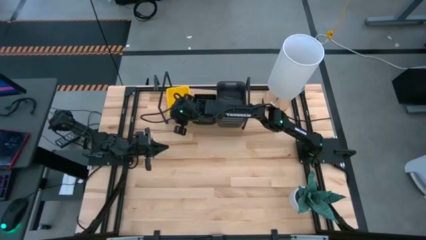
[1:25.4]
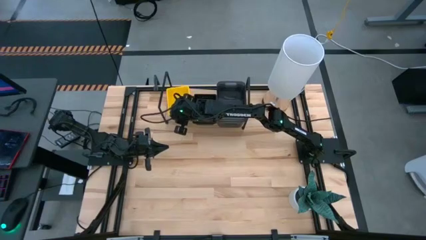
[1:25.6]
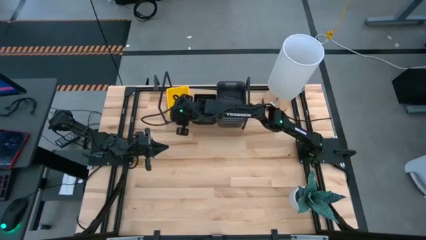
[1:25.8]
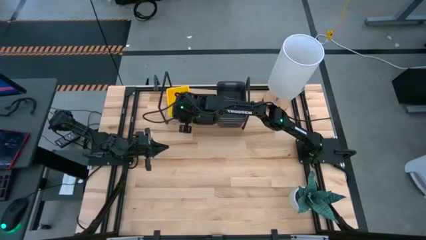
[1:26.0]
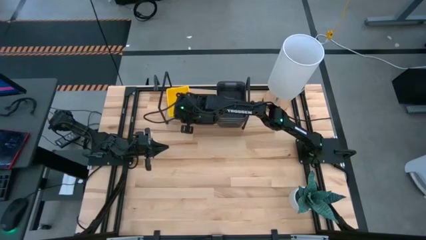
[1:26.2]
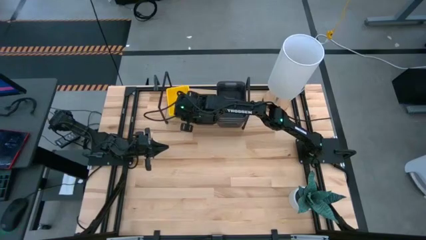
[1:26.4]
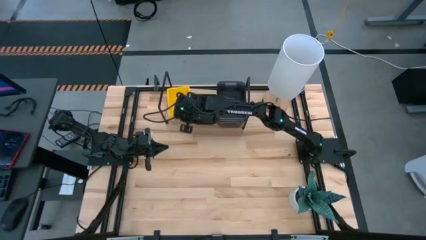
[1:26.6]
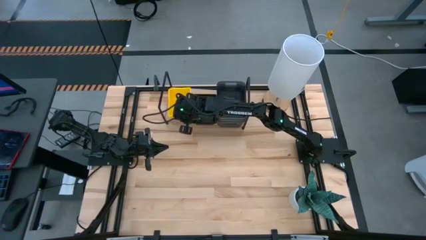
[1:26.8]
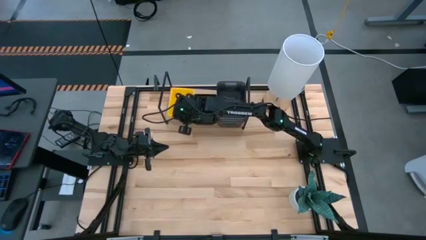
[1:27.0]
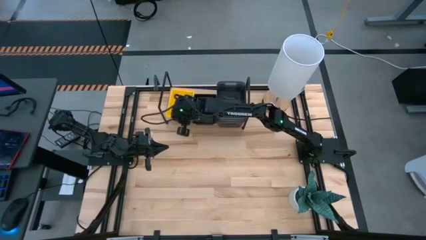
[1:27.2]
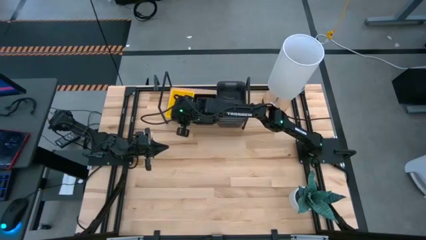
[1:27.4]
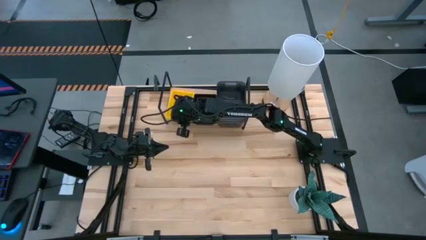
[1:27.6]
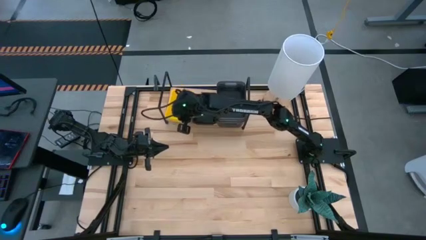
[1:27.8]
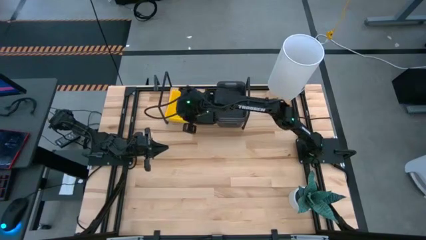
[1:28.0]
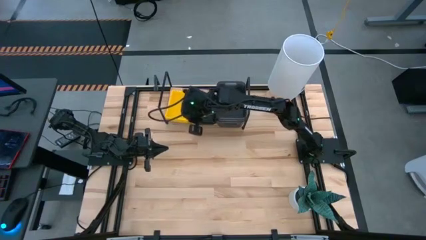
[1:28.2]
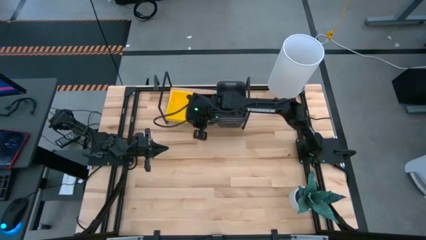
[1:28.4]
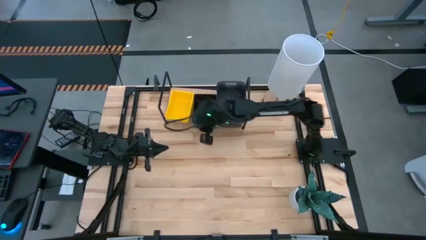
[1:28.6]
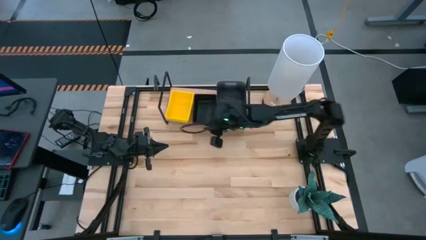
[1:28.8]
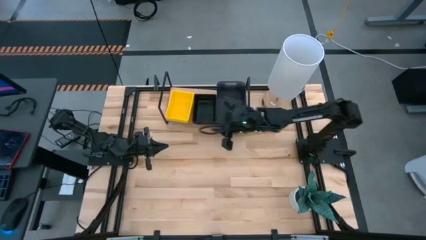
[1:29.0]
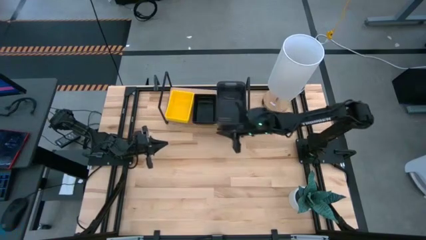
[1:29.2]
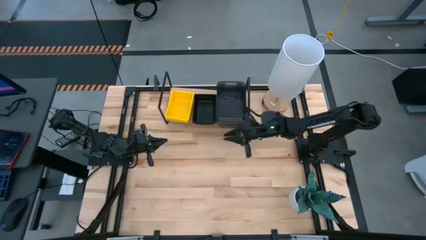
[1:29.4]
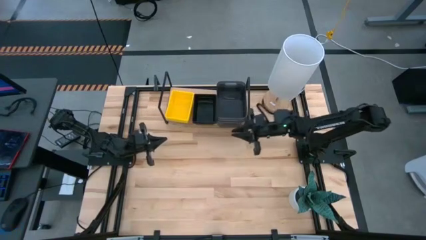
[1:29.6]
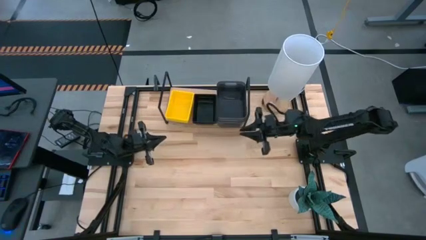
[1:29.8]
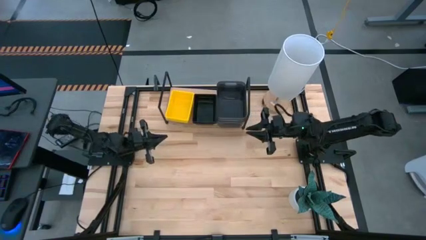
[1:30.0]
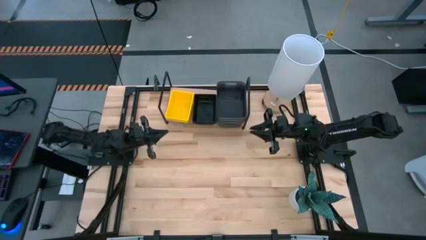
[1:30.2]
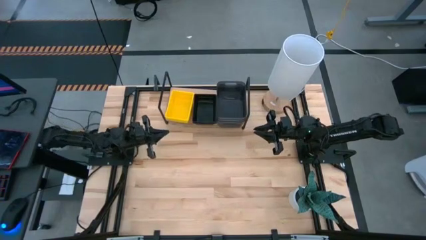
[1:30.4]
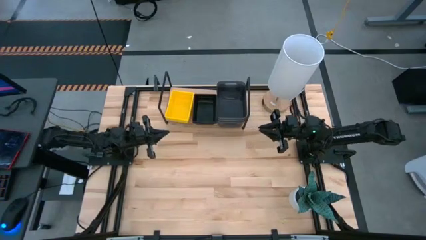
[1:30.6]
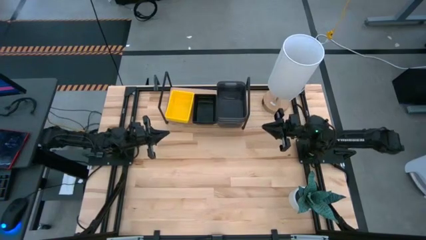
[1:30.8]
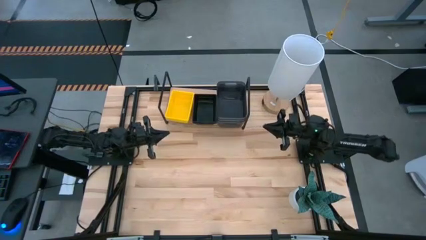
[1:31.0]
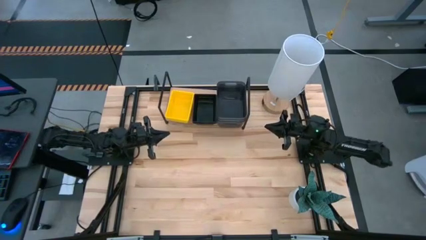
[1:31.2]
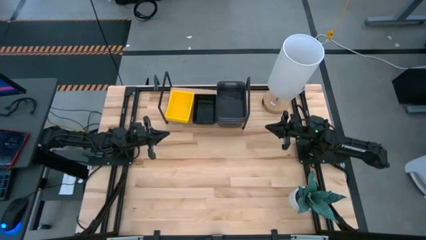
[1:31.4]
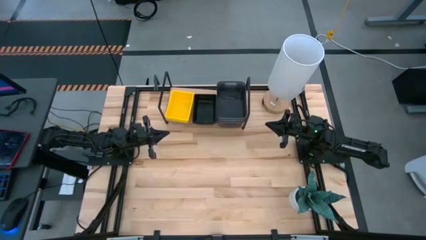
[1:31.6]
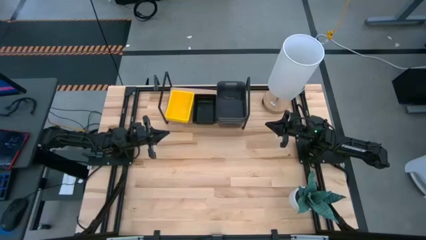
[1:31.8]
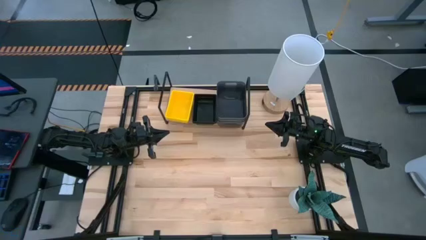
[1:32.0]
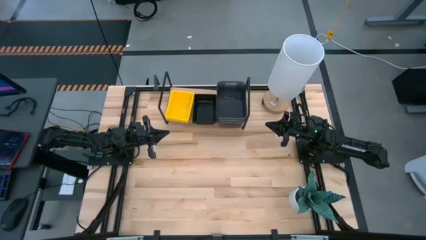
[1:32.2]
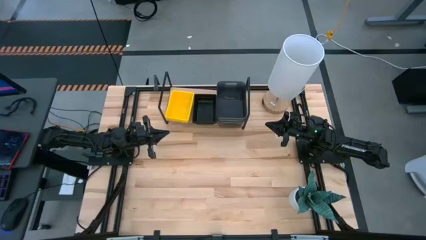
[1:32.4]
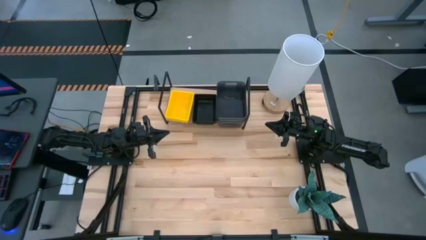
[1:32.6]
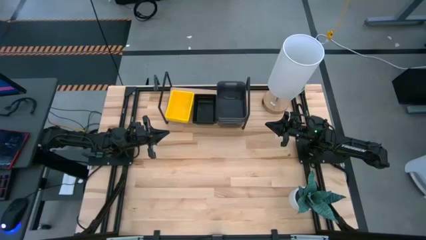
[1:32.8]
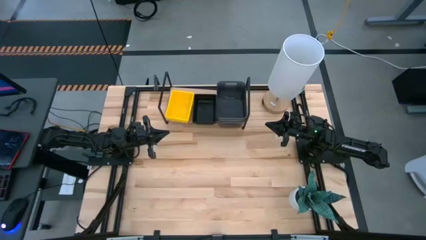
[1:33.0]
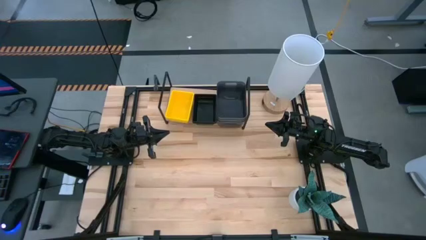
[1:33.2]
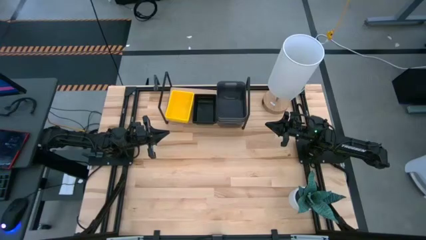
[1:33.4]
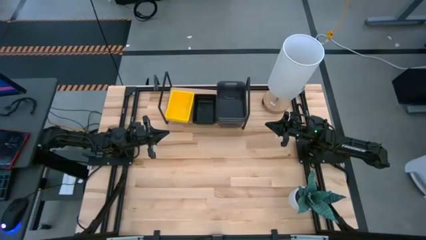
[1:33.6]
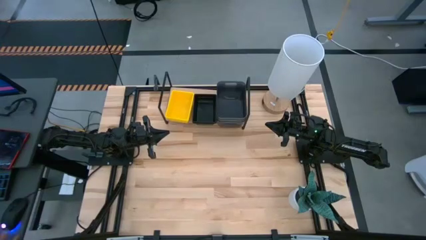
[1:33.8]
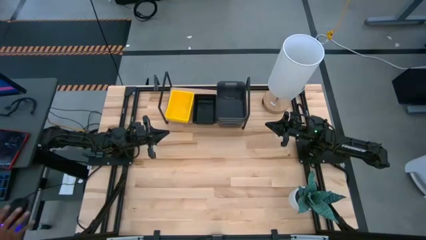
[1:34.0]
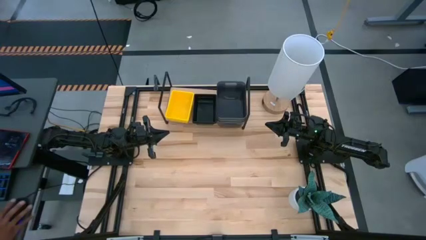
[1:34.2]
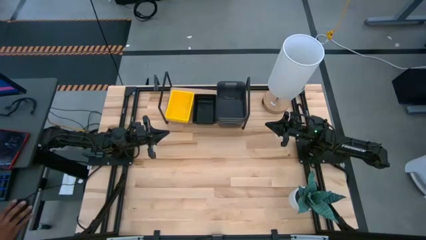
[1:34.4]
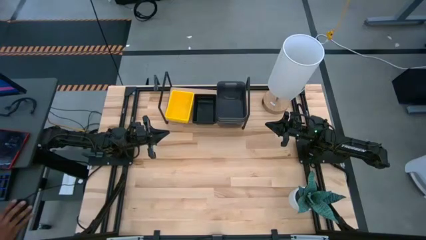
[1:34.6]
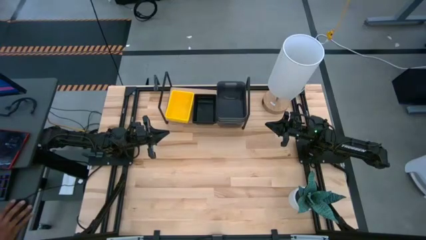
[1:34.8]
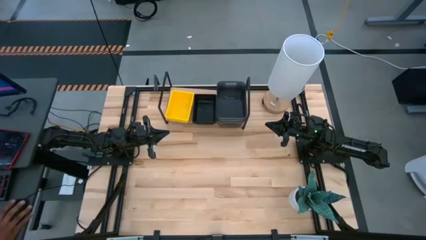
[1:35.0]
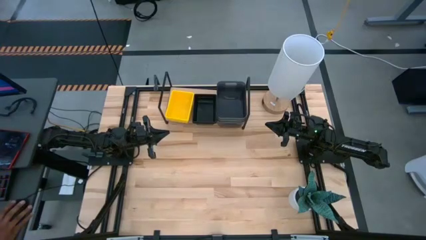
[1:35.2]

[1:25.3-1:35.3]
Task: Stack baskets on shelf by color
Return to Home Position

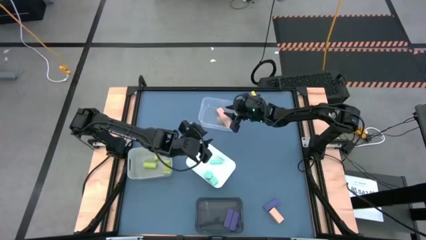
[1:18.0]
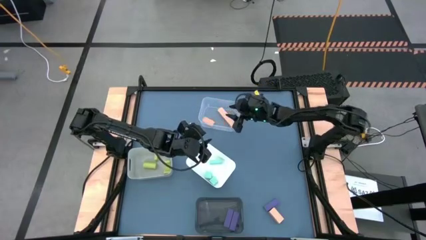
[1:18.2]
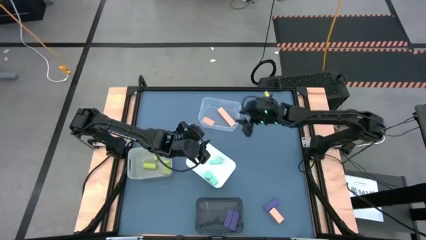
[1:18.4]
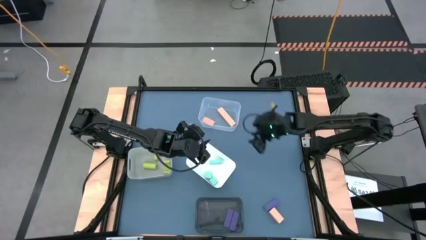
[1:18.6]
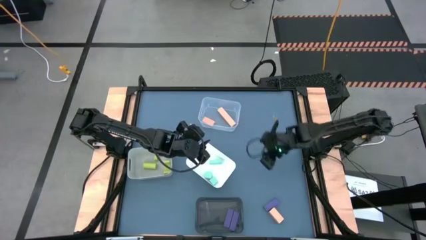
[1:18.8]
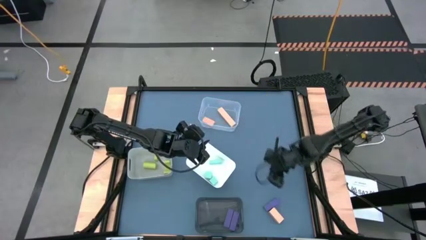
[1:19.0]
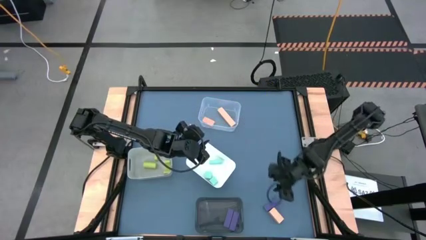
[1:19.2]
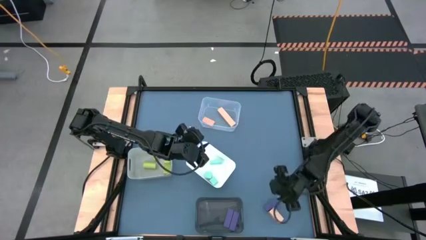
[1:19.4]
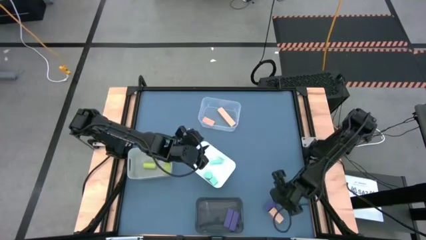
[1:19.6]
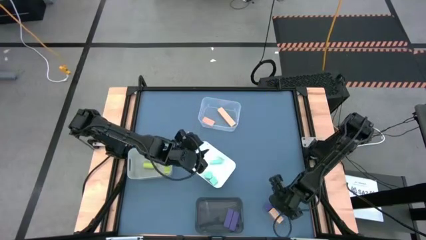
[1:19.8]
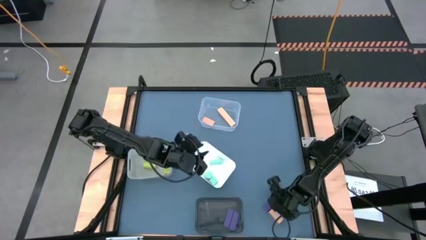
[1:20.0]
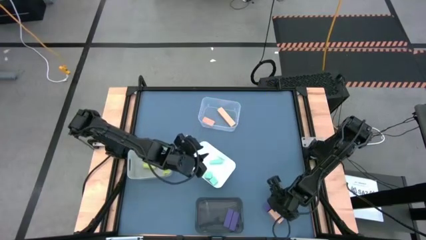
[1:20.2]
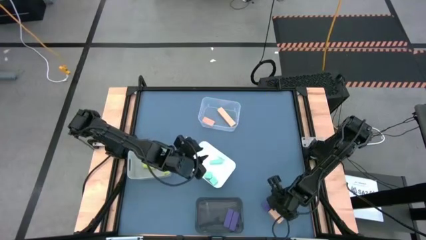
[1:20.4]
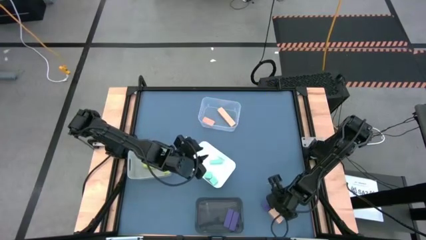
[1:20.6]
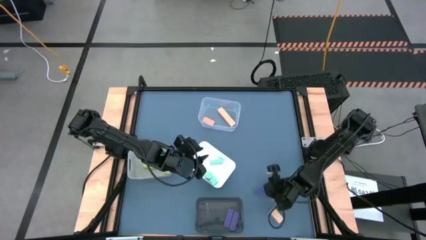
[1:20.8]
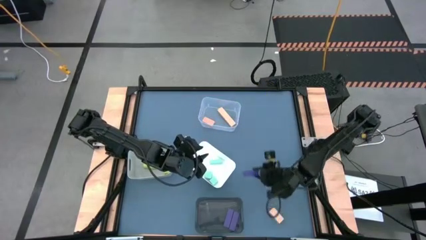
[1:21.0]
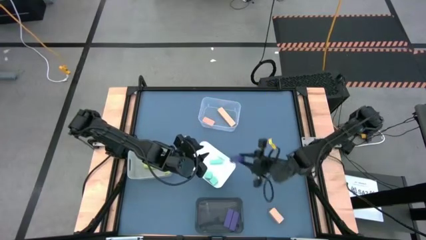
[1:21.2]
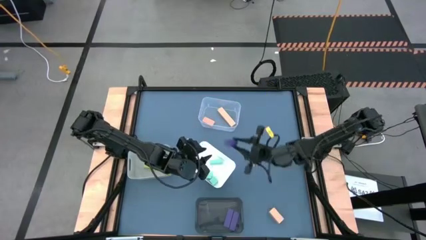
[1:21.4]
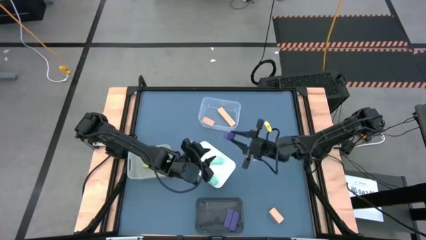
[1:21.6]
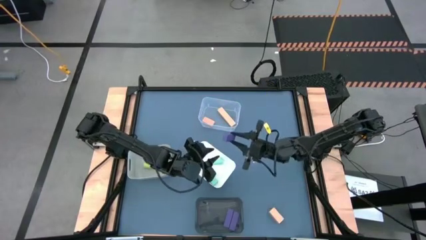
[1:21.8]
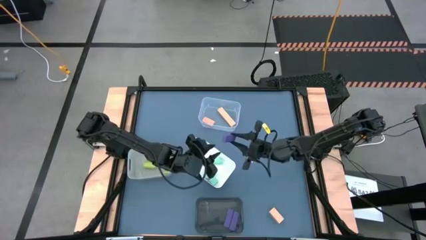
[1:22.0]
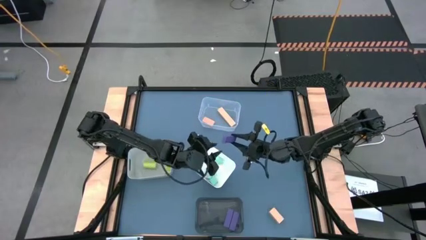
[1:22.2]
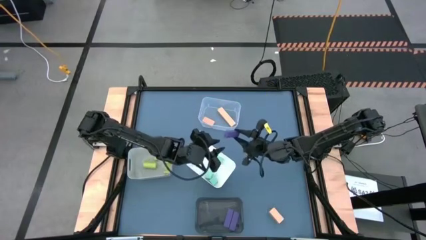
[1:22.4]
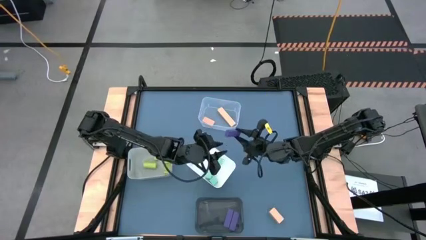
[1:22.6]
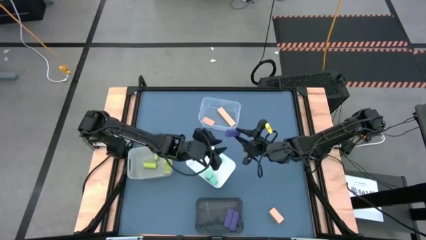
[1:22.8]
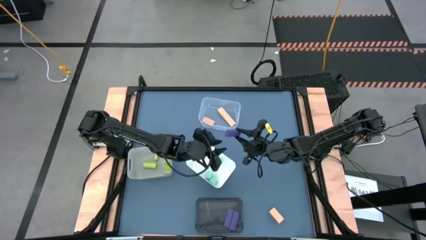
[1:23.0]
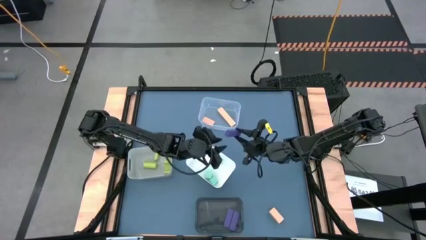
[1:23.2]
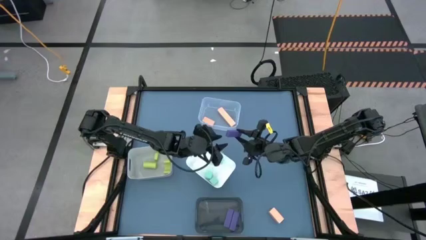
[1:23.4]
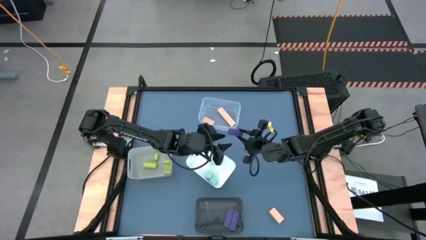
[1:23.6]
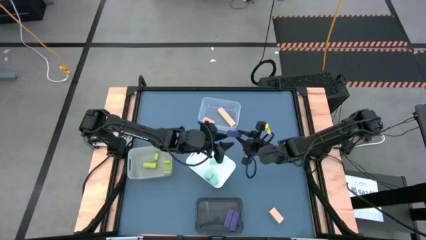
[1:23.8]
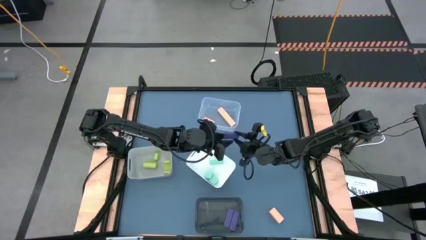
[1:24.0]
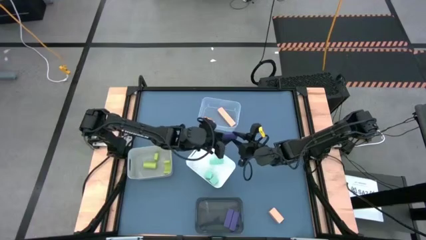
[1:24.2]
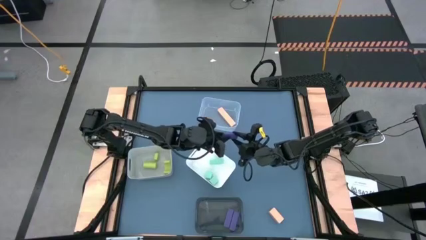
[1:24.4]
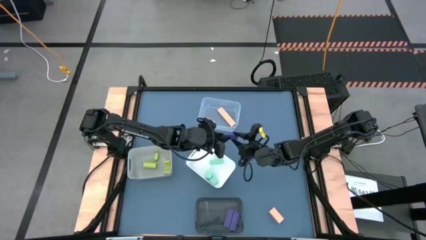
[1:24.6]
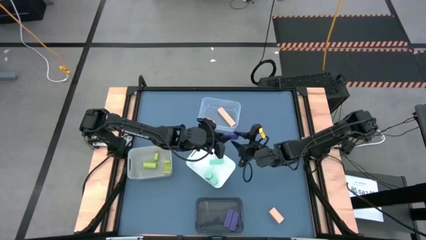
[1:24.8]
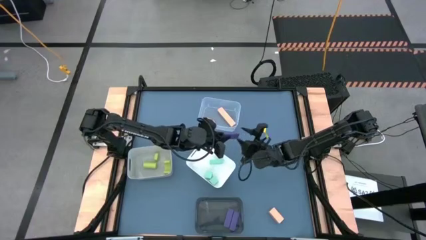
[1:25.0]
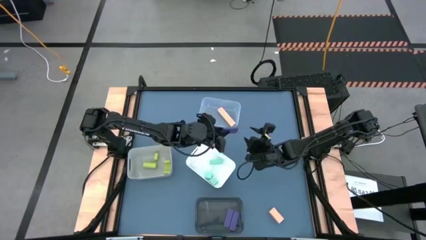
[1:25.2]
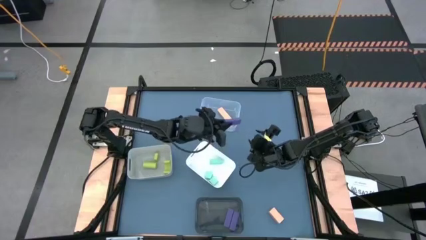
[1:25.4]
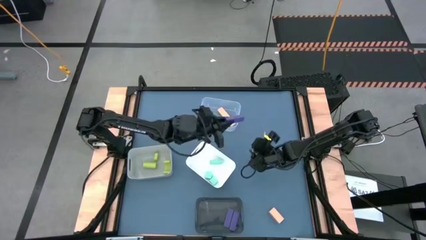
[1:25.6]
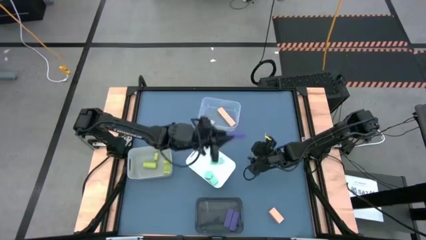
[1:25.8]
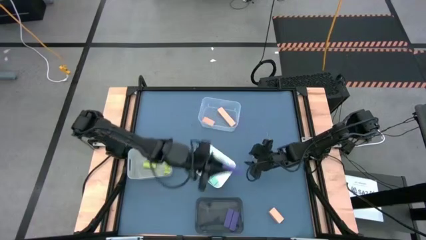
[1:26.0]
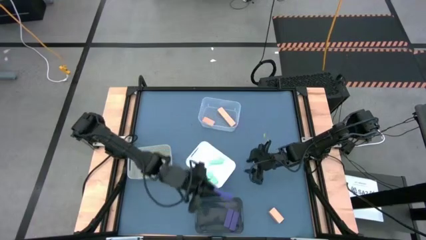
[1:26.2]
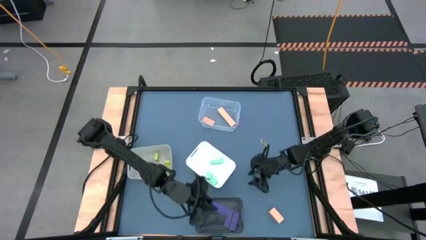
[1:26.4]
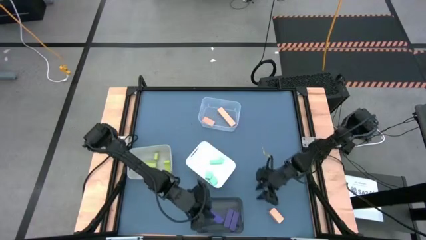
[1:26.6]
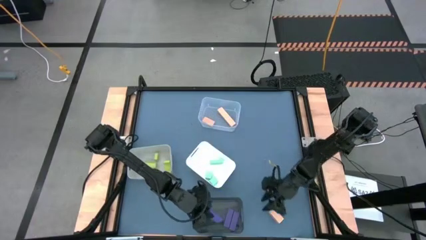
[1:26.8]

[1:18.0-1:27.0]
Task: Sort & place blocks by color
Put the purple block into the black bin
